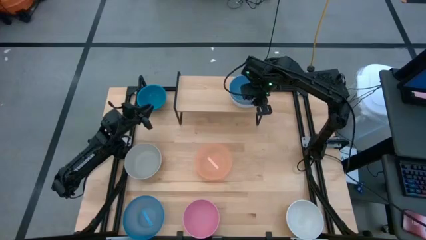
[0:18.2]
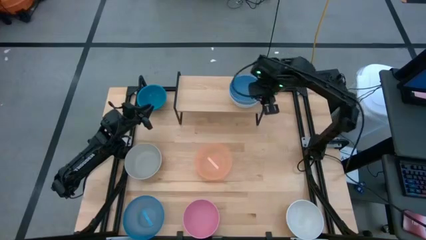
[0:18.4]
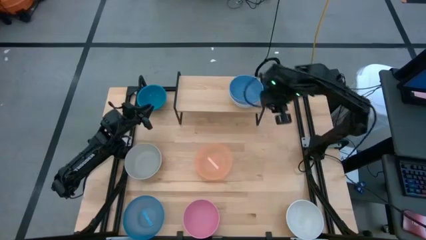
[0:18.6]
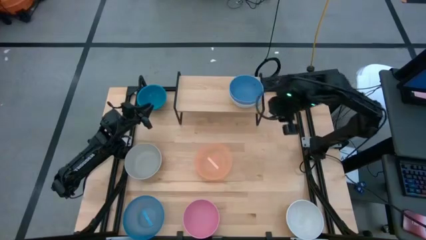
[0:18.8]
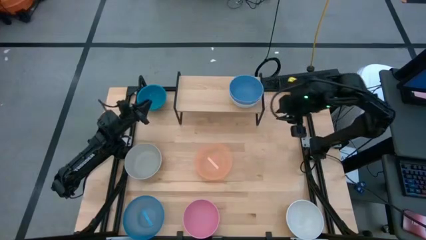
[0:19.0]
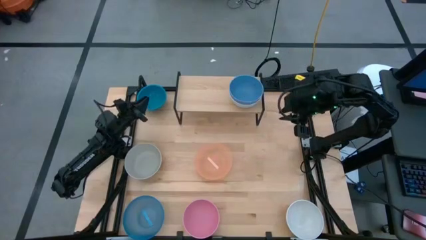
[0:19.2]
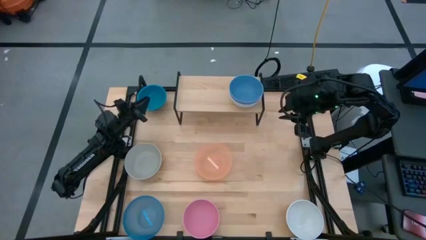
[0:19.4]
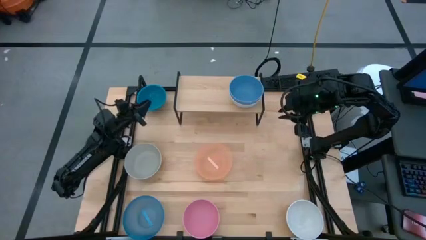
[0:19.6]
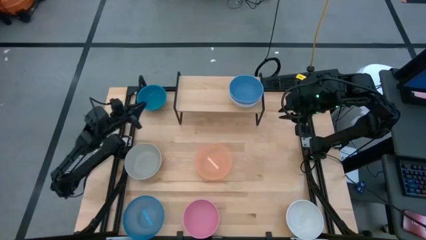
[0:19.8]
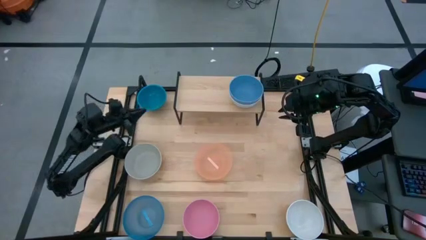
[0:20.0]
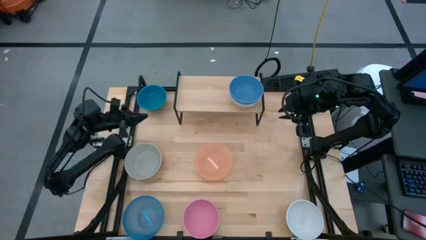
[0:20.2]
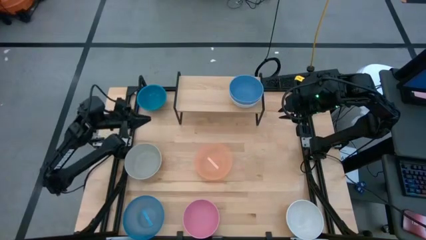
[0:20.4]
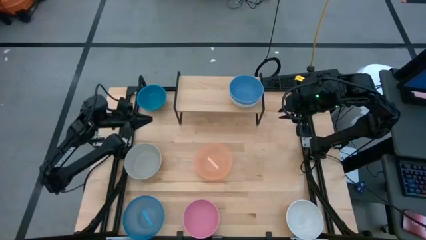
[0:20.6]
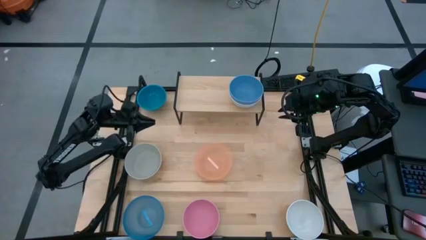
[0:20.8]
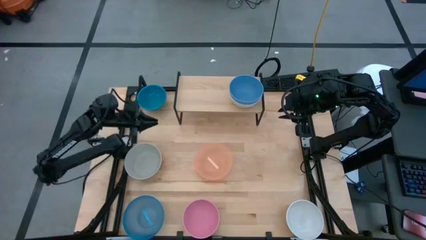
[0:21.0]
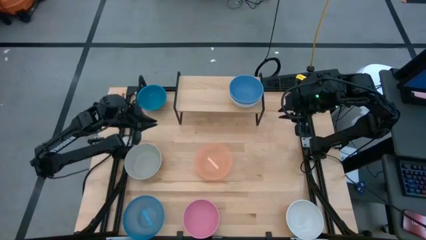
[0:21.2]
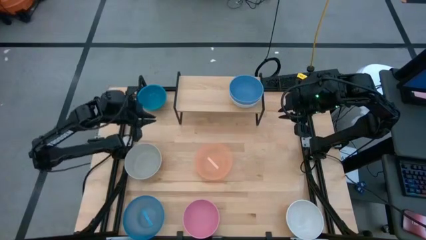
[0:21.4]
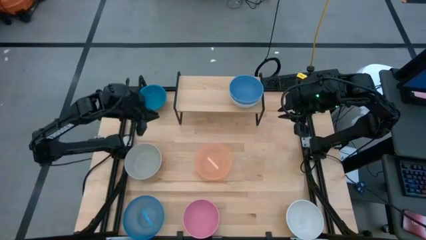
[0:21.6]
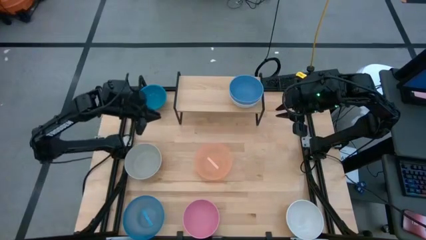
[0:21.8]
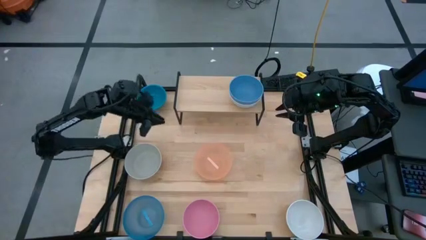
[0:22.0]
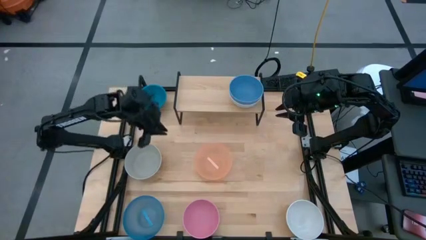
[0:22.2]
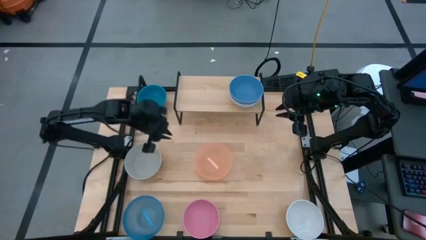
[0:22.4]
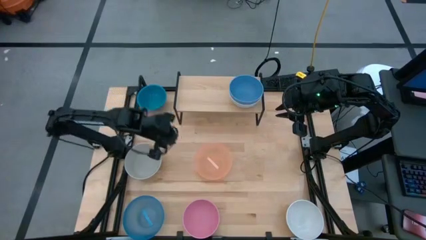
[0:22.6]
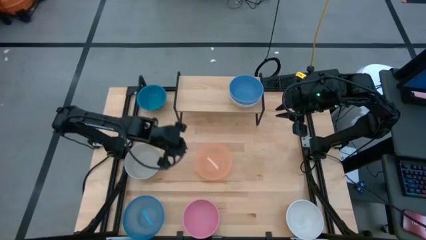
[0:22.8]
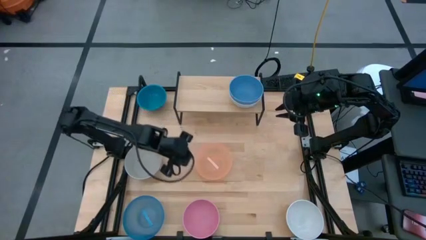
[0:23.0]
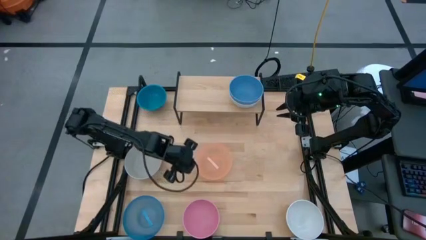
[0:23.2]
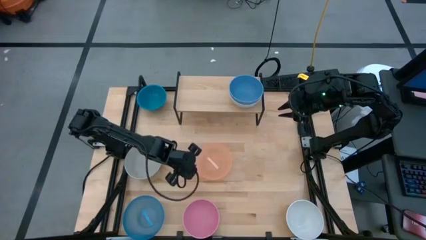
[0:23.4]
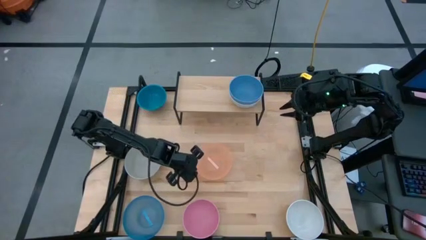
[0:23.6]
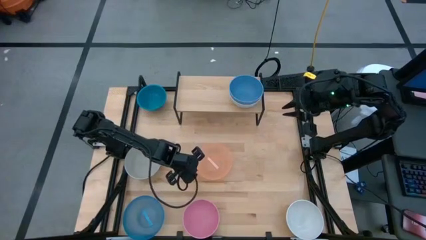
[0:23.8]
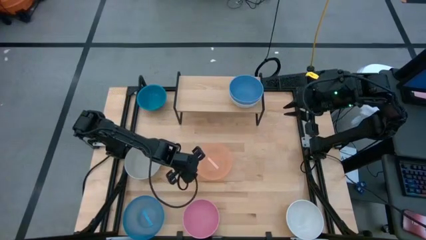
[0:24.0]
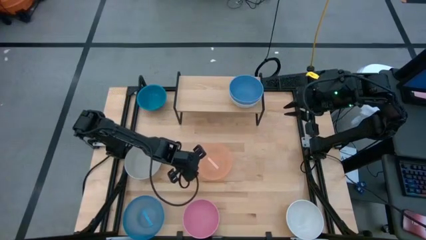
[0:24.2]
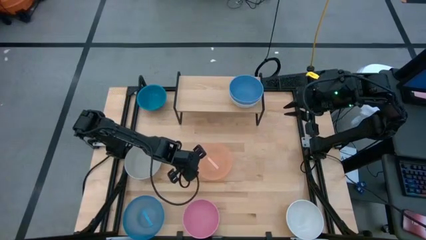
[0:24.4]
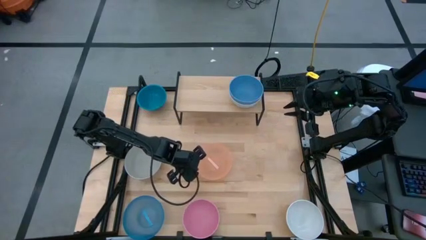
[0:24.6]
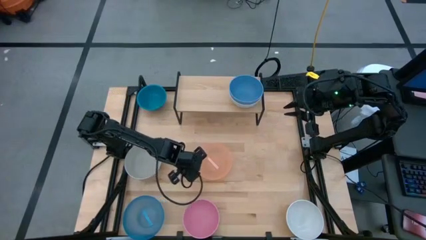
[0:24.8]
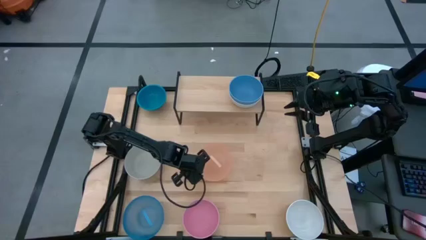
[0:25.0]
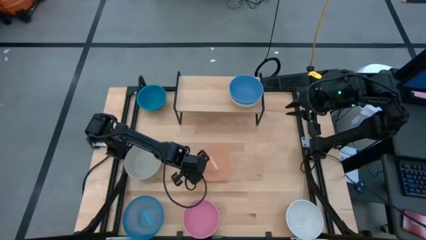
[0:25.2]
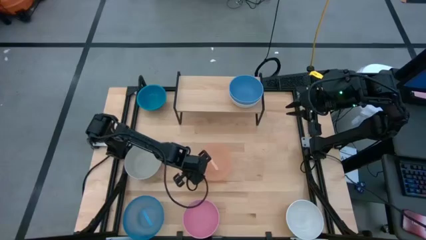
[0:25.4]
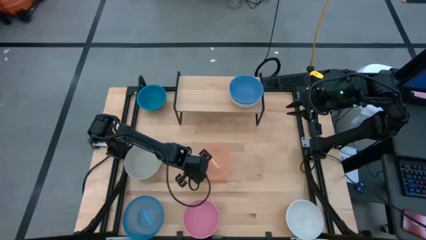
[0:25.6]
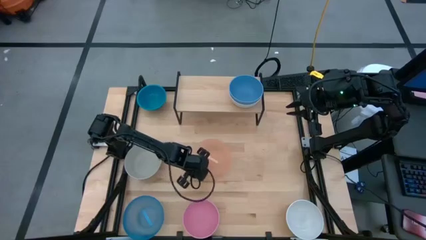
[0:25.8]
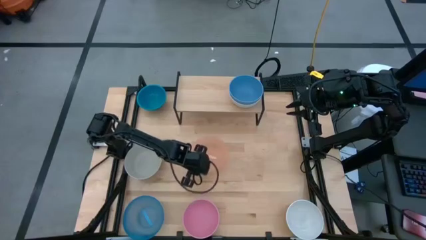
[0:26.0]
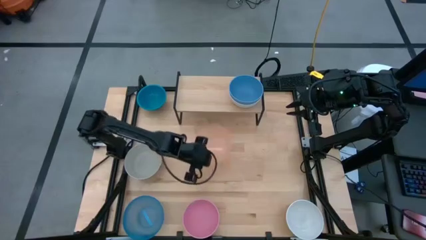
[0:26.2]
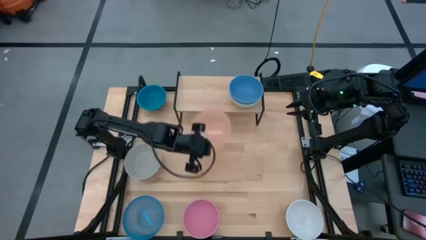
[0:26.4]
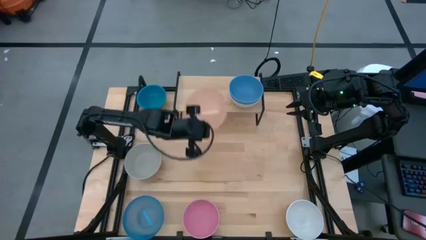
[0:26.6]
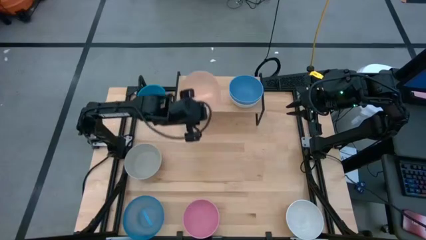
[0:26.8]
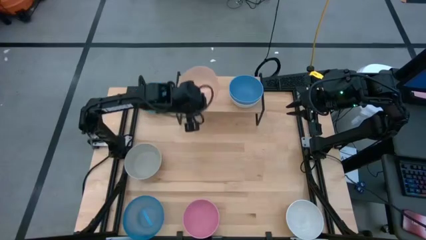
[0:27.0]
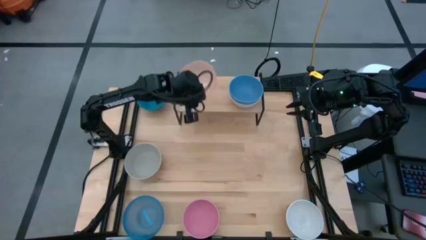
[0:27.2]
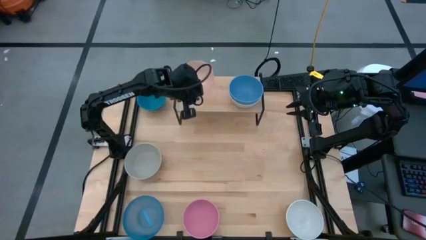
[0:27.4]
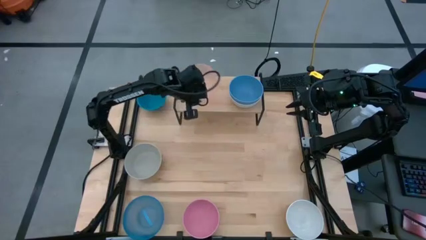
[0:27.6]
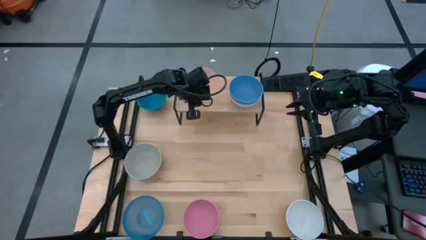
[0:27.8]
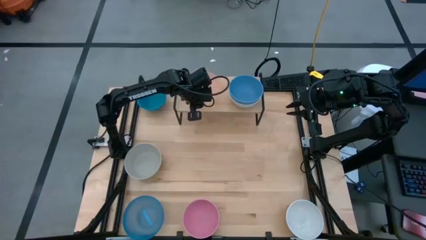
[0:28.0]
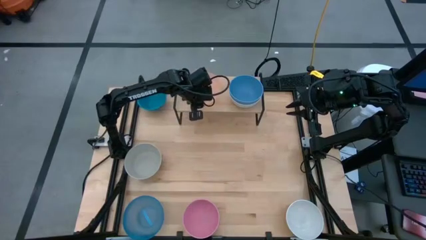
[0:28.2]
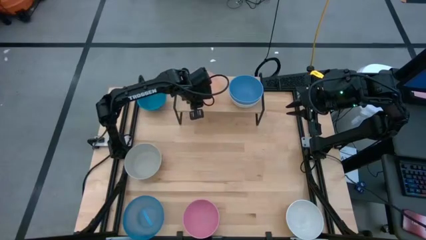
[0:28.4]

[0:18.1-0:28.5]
Task: Place and stack bowls onto a shelf
Put the orange transparent bowl on the shelf

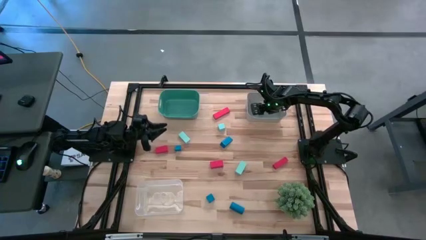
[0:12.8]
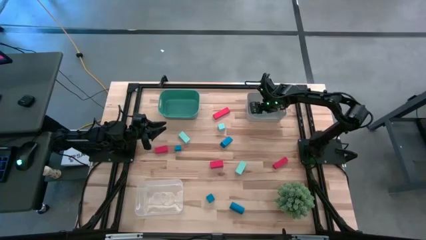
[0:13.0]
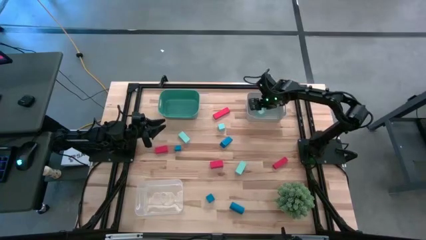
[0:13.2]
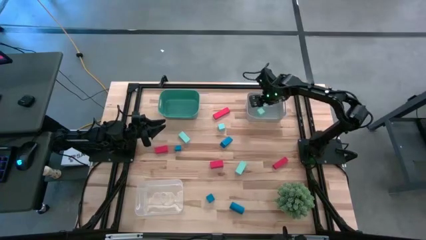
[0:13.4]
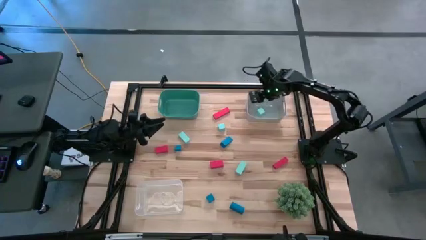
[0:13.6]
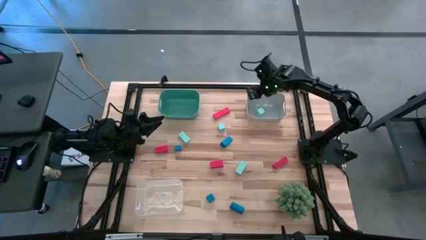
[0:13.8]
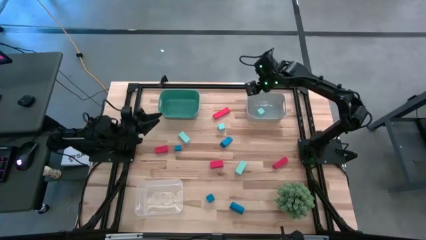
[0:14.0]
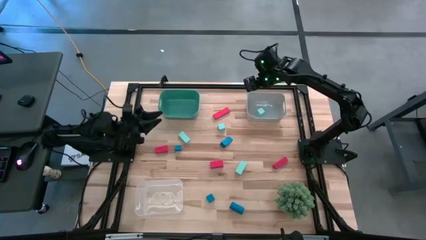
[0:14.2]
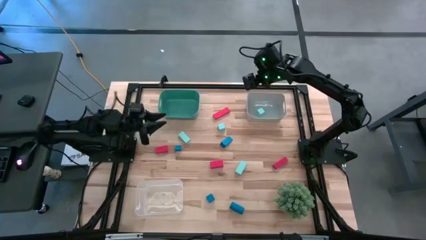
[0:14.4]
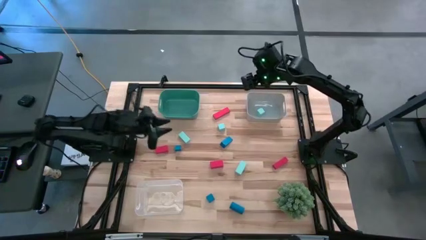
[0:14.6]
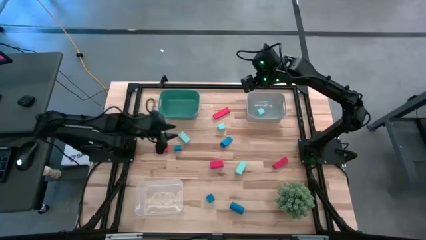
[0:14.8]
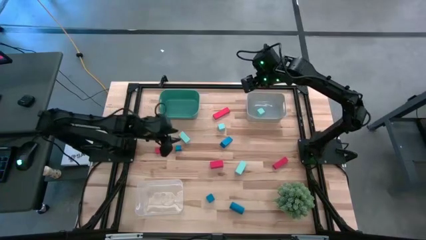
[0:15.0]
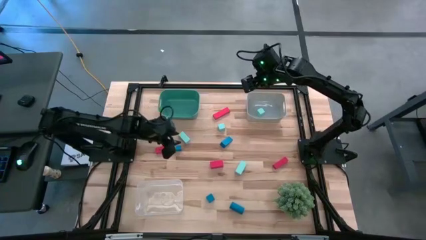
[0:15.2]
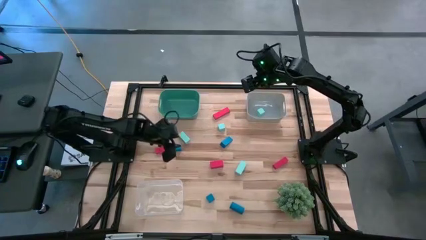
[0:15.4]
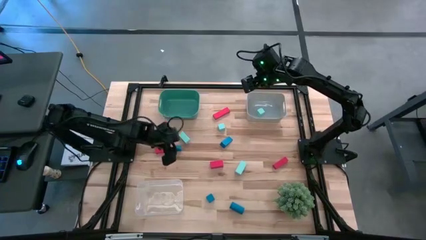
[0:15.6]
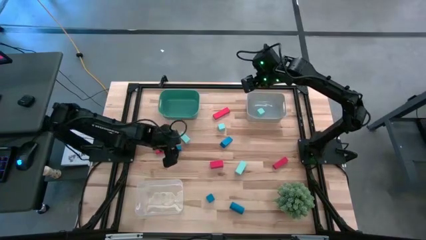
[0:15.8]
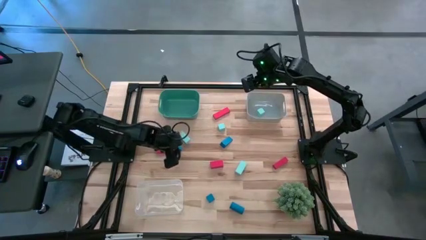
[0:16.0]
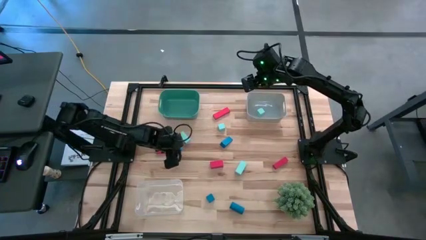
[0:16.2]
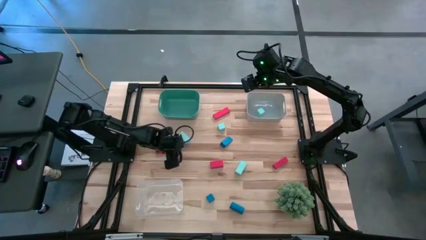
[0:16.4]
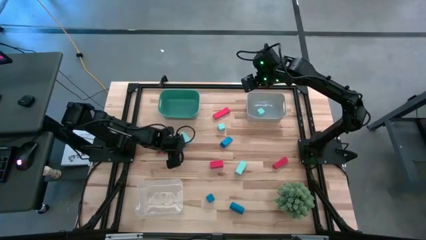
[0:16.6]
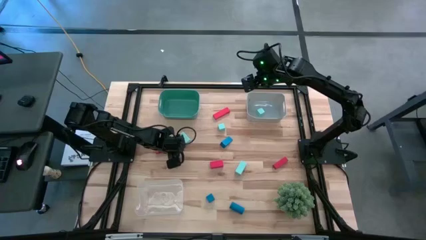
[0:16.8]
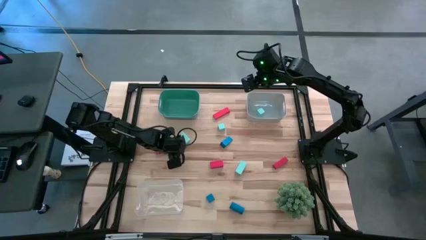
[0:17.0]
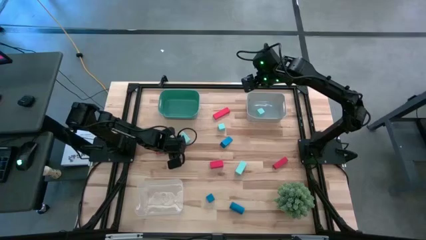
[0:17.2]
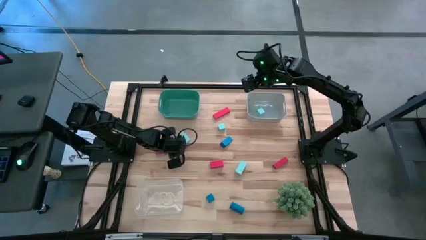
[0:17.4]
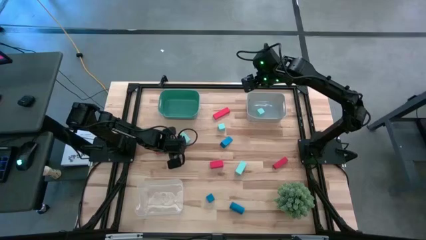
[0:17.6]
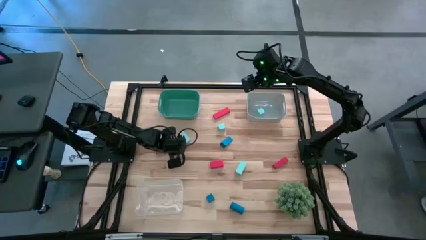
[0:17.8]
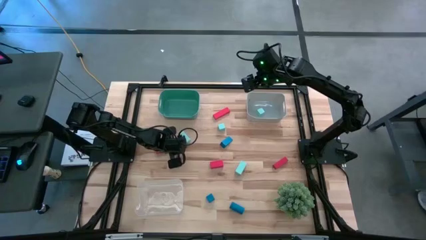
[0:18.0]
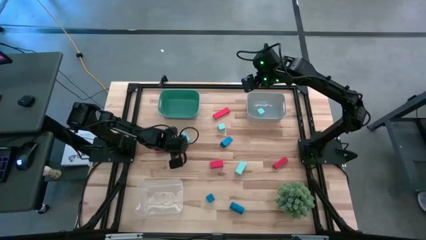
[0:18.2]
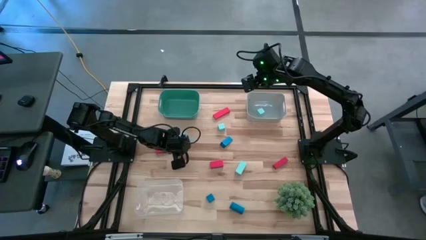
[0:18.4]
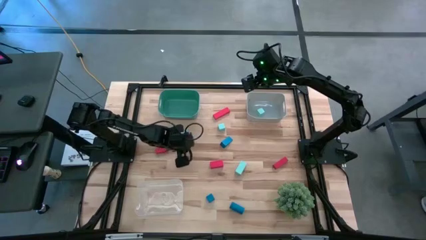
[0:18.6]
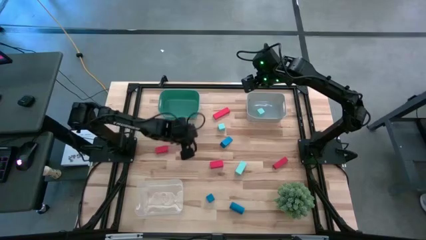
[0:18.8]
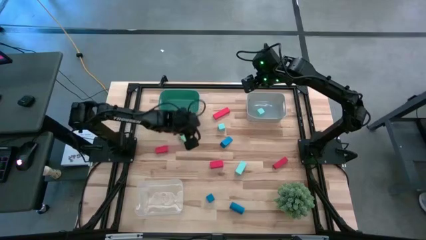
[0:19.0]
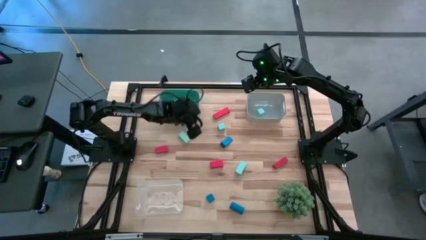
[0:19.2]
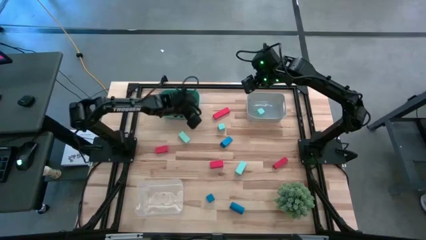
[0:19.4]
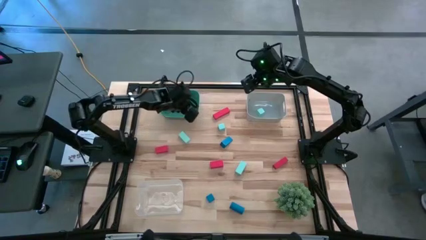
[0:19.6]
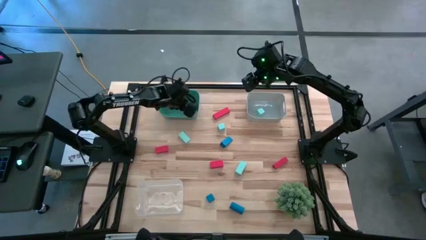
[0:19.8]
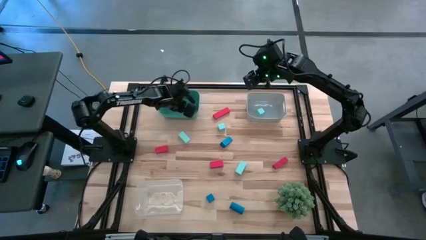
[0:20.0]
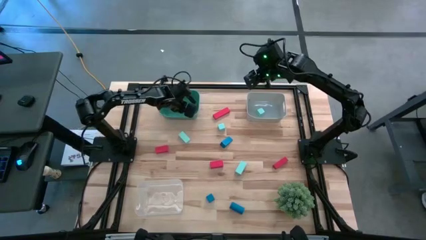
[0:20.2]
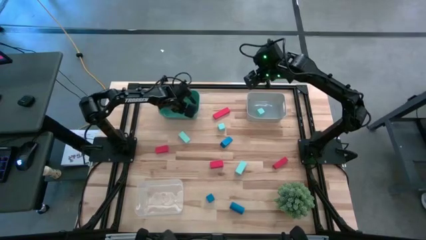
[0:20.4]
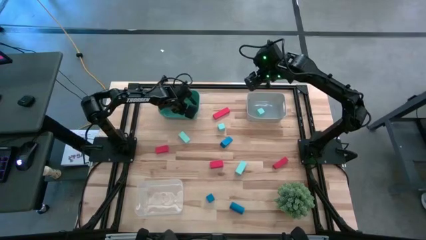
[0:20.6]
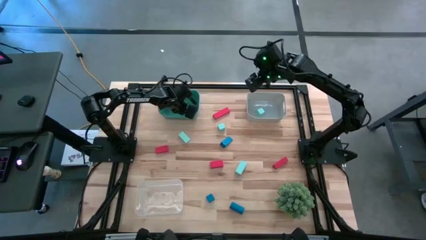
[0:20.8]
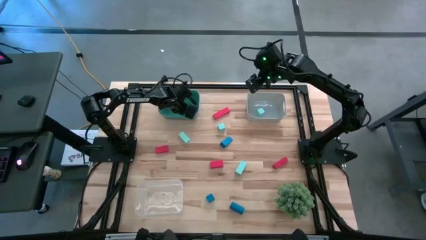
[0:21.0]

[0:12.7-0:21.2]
Task: Sort & place blocks by color
Put the blue block into the green bin
